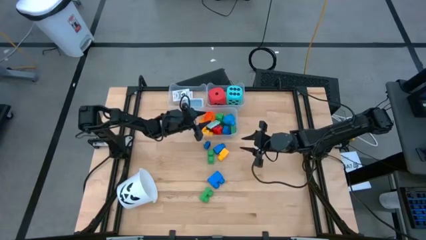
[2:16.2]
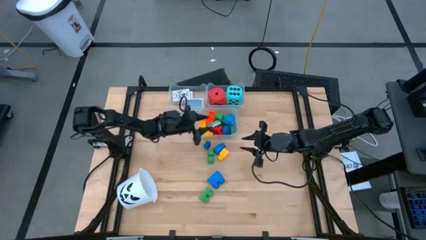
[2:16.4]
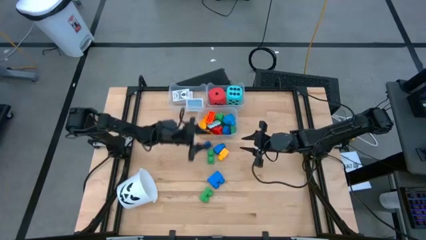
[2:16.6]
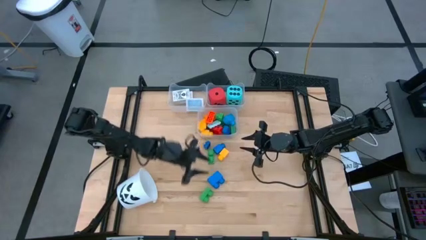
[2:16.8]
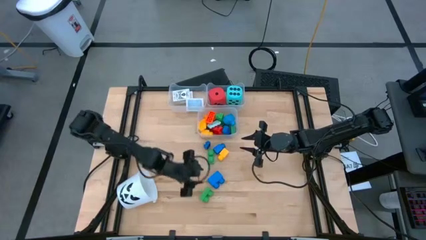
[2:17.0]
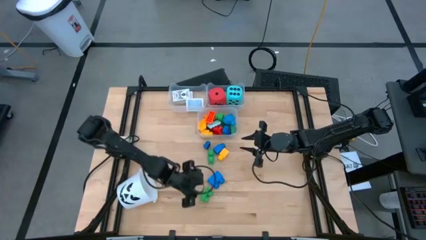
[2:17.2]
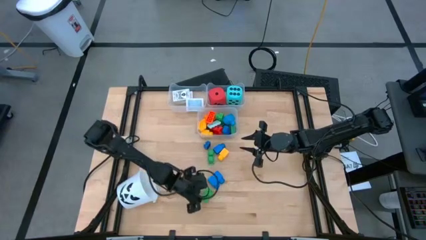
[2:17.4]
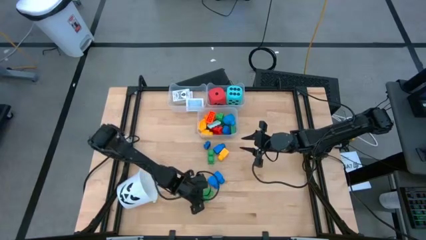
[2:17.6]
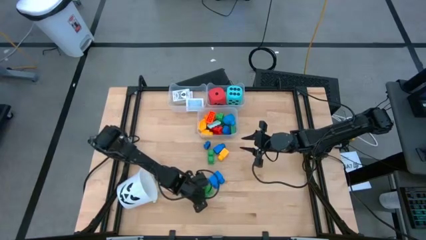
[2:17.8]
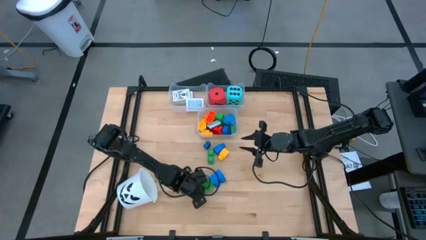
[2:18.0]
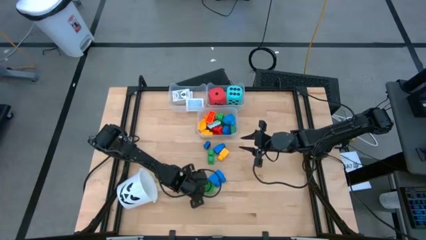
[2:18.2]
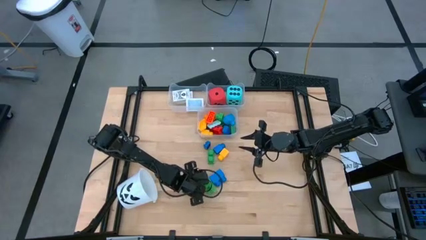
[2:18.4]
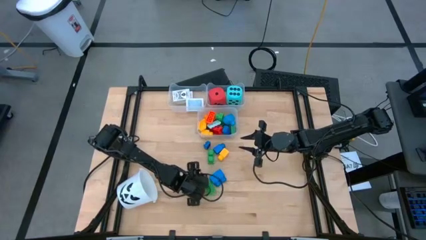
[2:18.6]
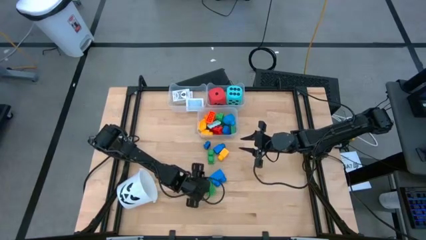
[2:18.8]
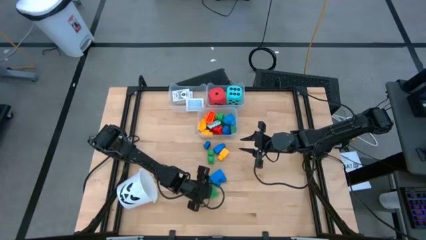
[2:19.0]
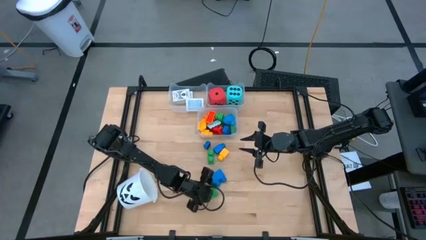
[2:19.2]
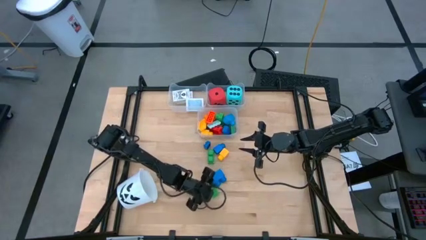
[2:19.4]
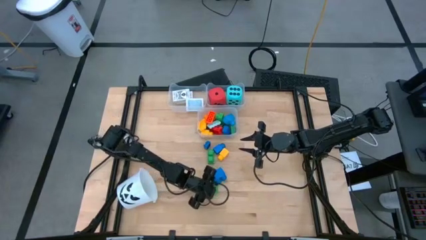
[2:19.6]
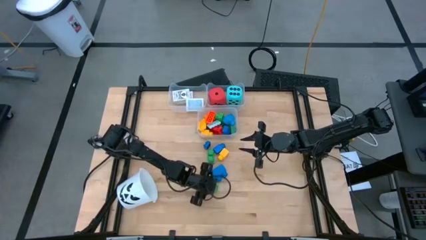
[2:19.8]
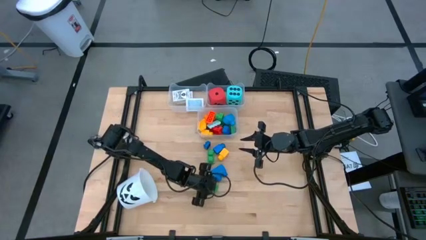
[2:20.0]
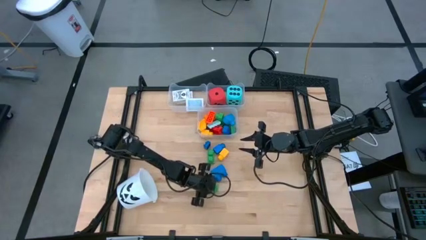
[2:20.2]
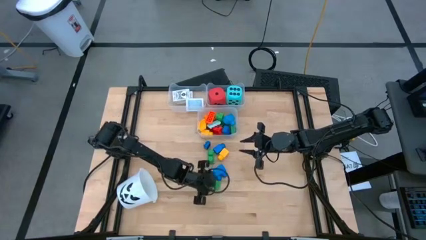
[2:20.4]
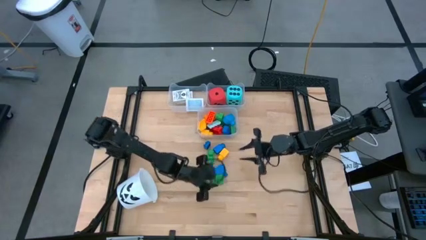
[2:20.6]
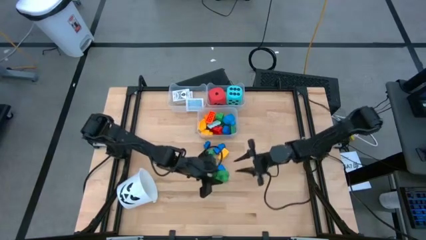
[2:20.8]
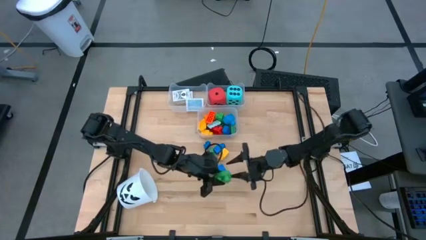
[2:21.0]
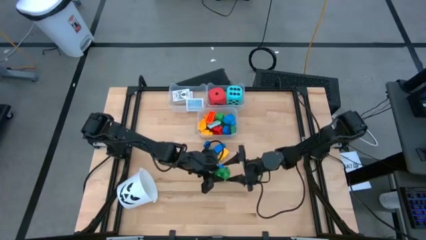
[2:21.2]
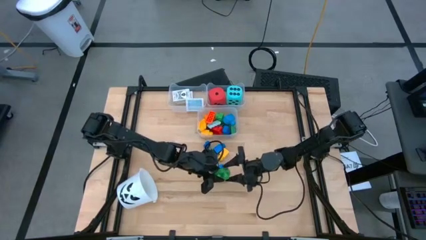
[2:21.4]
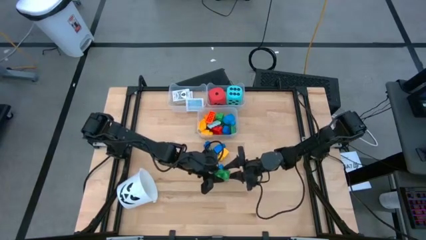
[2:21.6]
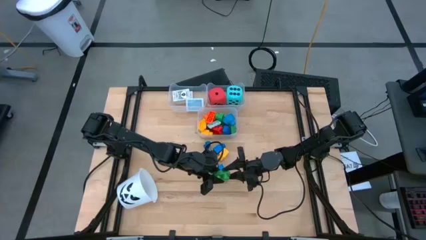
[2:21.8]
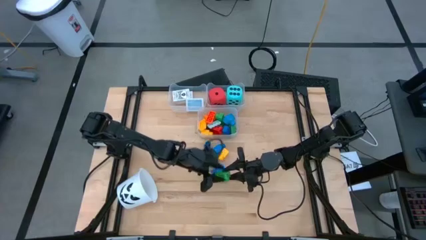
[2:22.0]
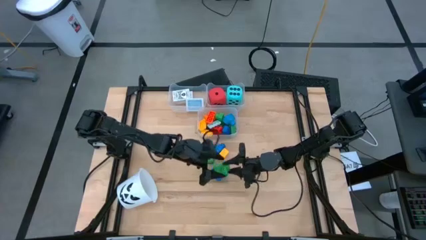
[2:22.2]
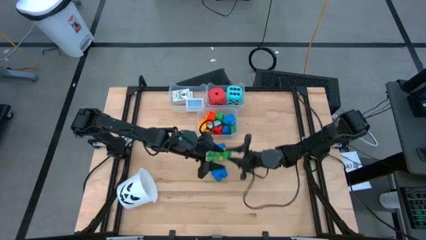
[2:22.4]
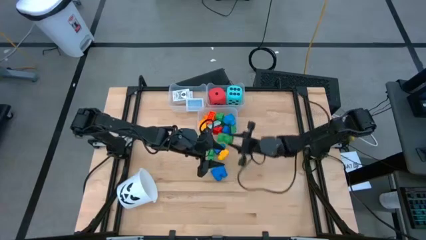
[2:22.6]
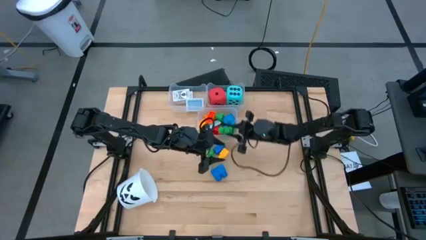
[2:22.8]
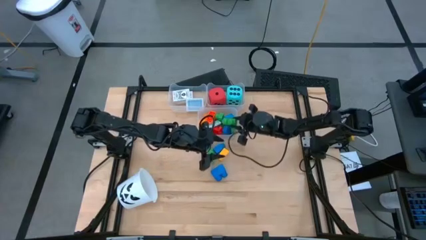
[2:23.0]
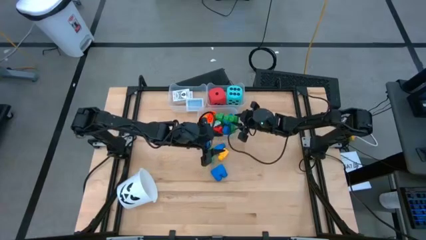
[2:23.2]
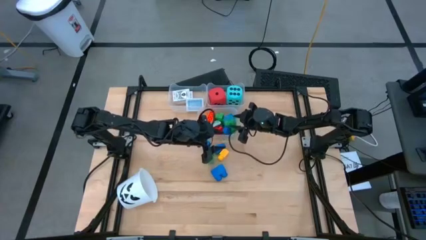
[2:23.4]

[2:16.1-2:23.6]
Task: Pick & Place Toys
Put the bottom green game piece into the bottom transparent bin

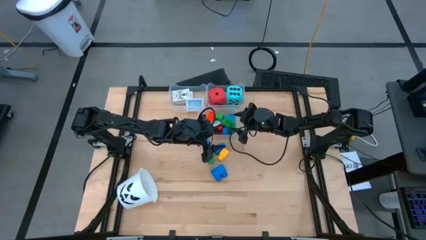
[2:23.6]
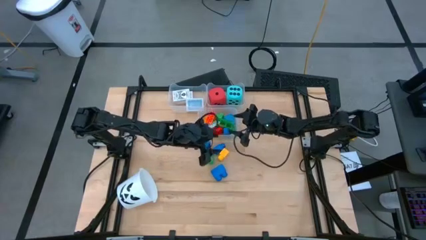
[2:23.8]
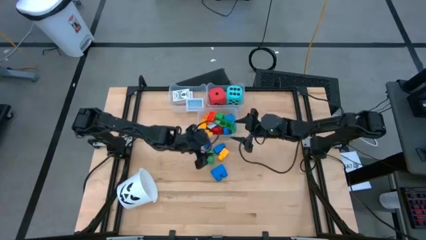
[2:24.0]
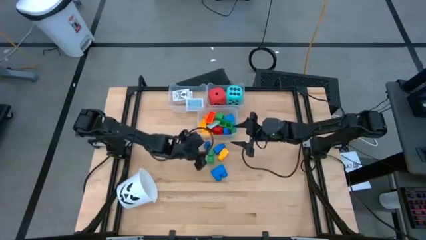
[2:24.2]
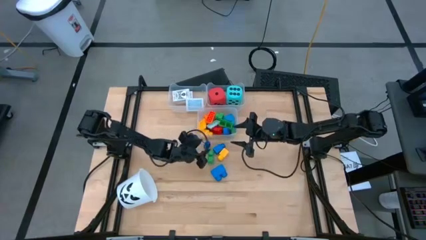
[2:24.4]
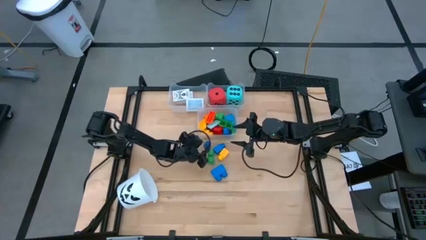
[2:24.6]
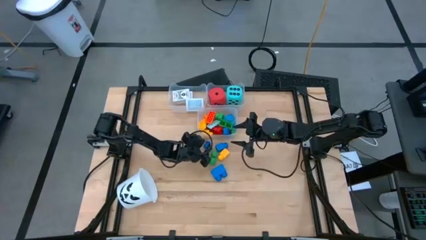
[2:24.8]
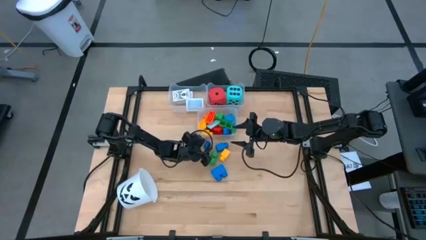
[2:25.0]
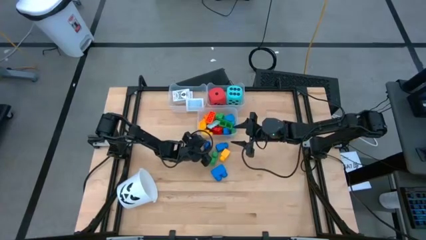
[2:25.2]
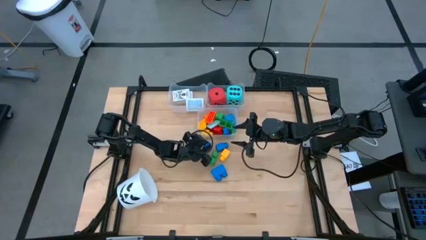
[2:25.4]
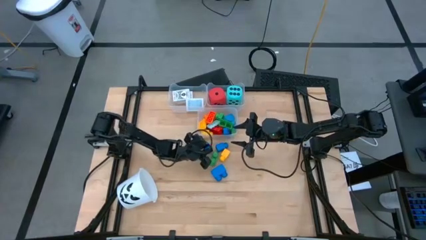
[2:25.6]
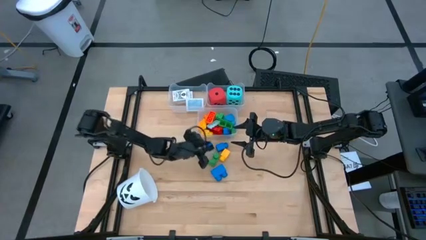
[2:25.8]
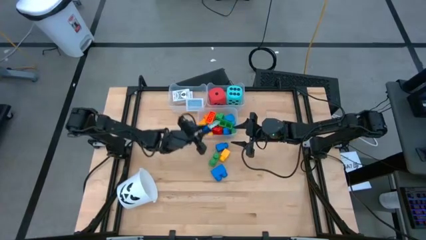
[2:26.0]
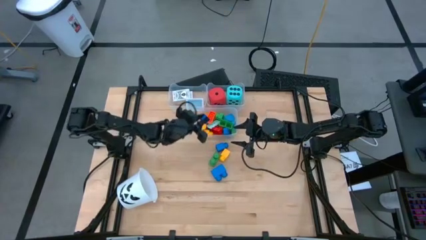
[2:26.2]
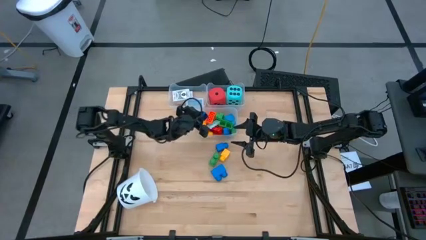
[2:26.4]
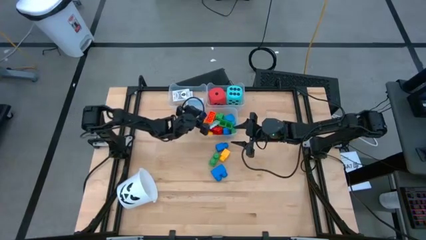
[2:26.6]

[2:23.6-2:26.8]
Put the left blue game piece into the bottom transparent bin

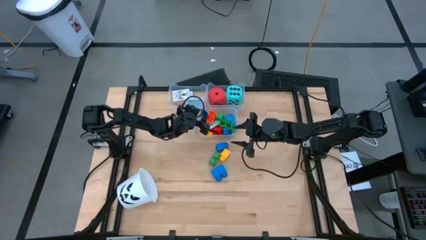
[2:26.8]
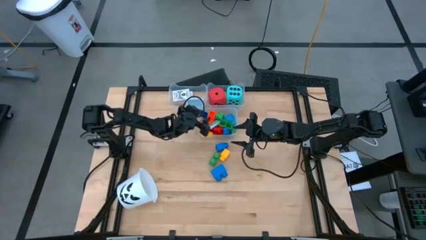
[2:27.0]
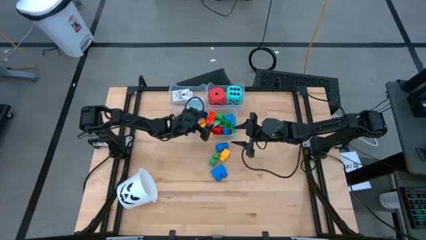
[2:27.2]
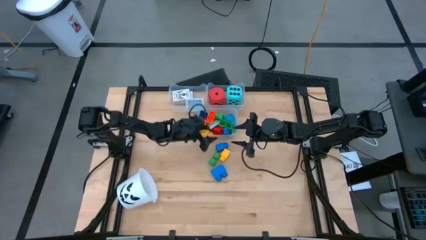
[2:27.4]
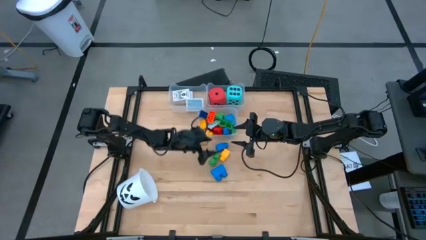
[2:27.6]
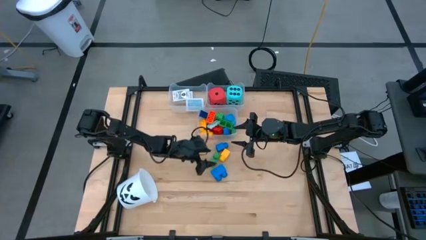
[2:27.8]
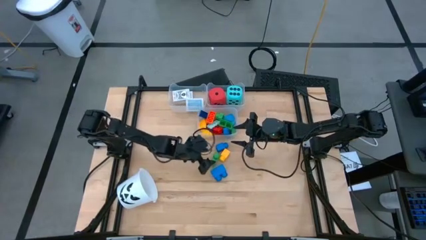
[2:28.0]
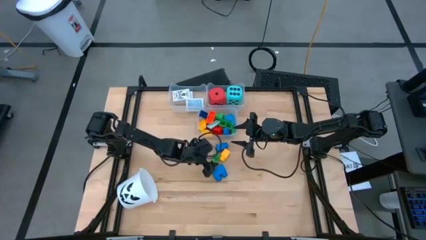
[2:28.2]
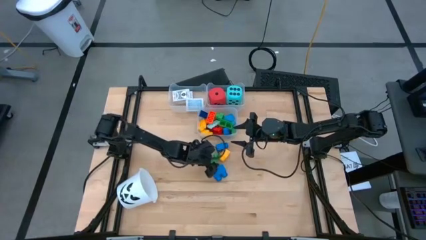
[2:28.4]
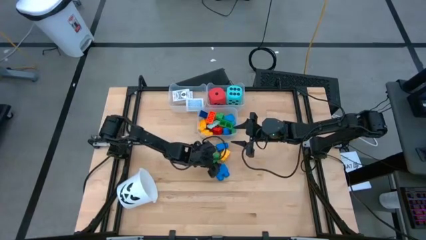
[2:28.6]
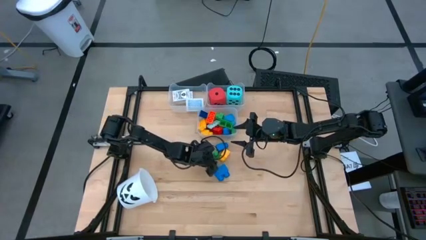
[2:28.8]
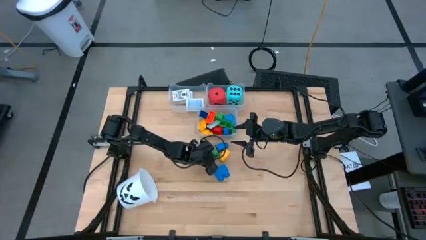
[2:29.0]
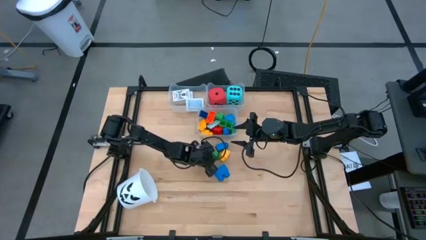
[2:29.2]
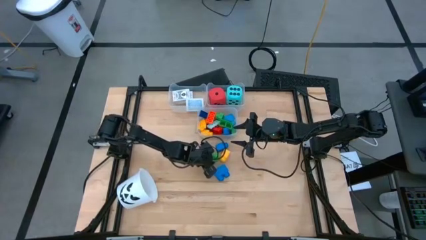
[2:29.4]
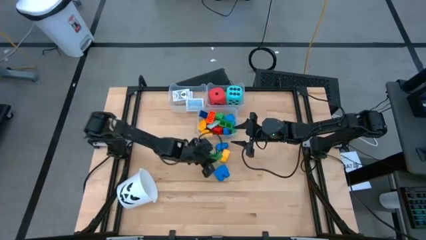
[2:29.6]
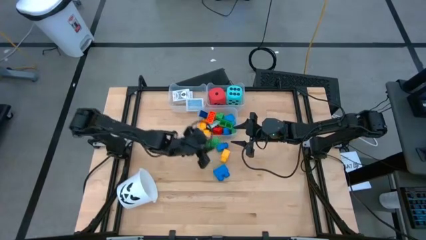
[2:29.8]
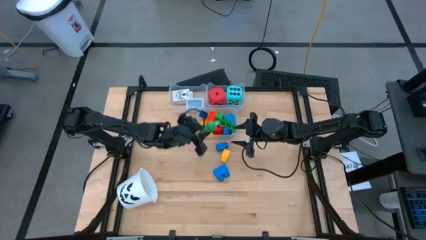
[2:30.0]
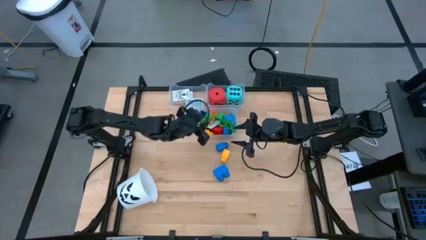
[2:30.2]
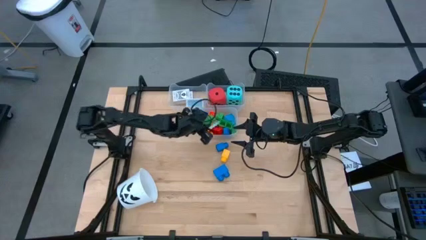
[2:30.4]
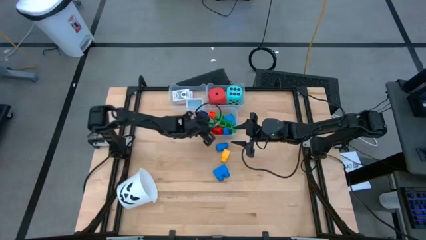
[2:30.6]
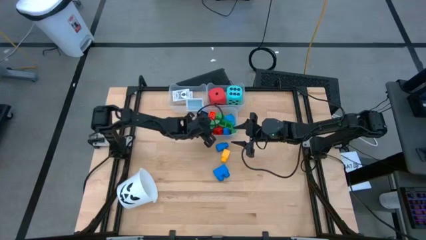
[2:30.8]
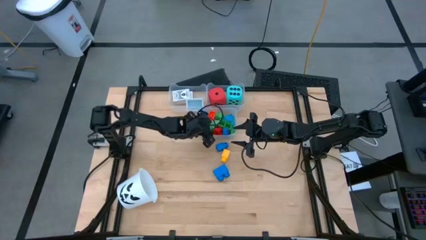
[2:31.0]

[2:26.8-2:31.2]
Put the green game piece into the bottom transparent bin
